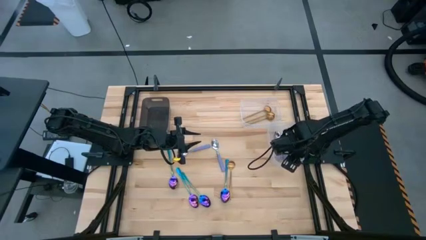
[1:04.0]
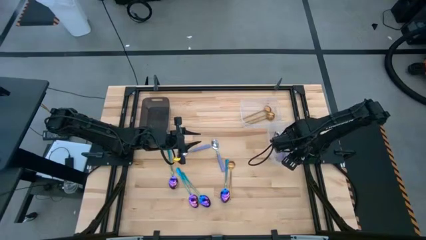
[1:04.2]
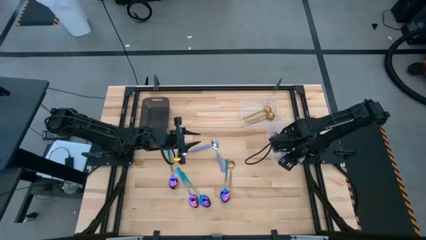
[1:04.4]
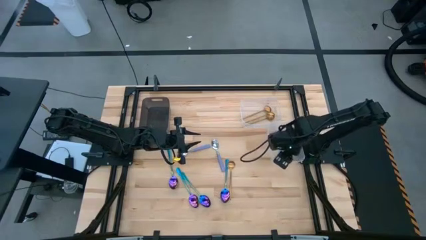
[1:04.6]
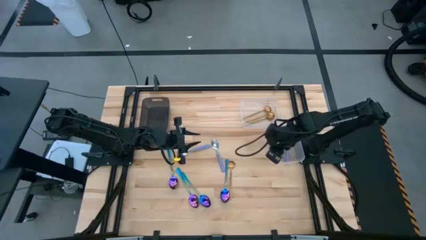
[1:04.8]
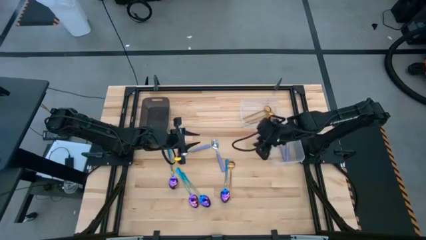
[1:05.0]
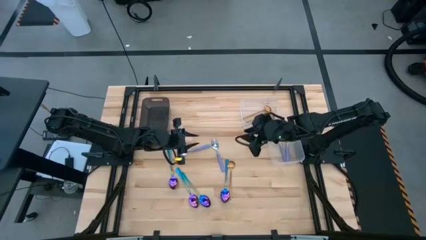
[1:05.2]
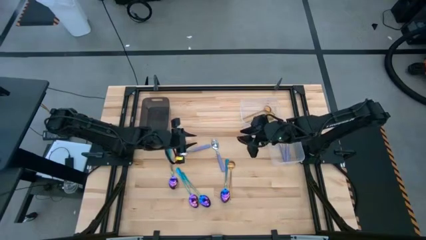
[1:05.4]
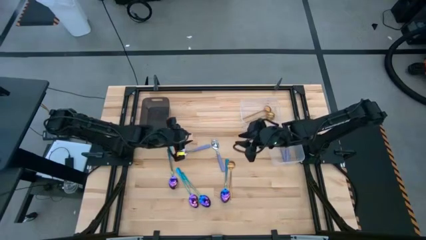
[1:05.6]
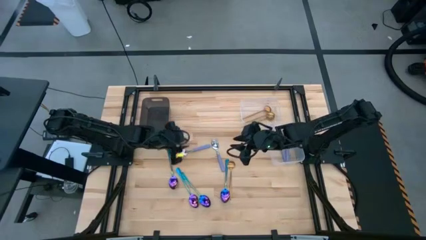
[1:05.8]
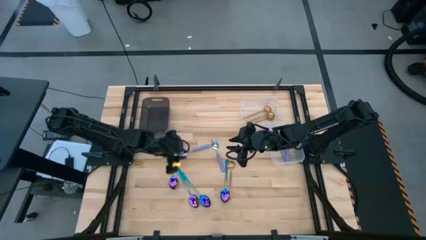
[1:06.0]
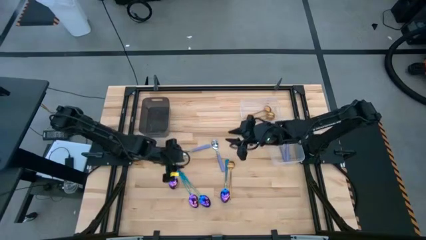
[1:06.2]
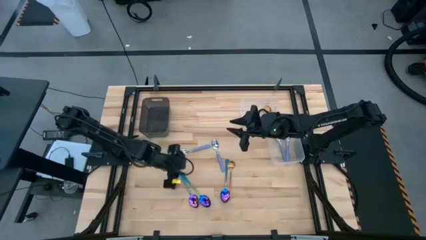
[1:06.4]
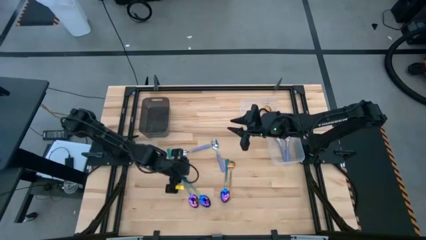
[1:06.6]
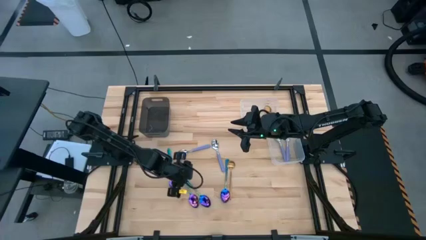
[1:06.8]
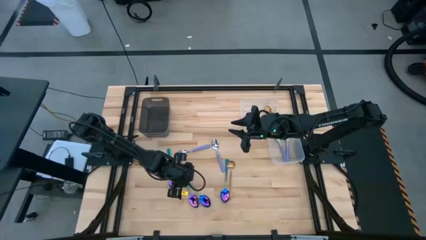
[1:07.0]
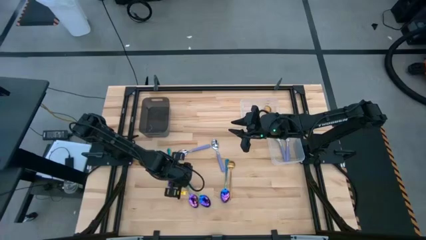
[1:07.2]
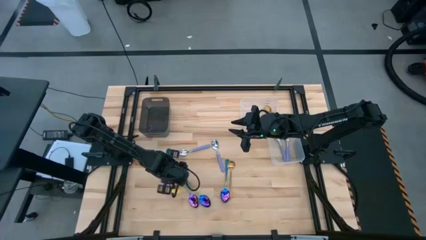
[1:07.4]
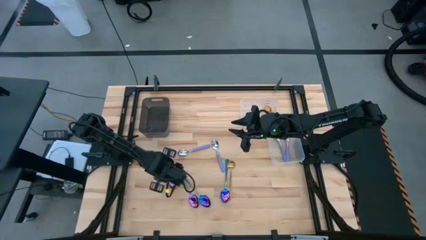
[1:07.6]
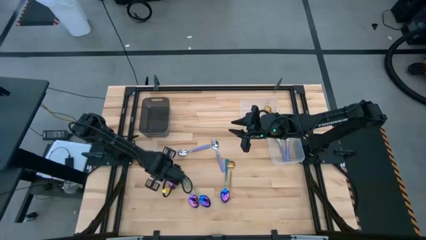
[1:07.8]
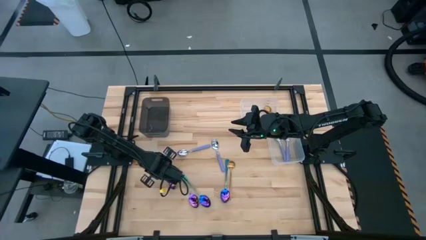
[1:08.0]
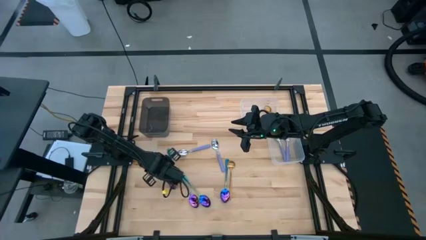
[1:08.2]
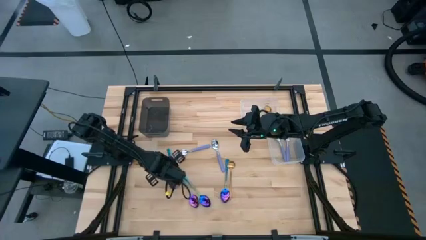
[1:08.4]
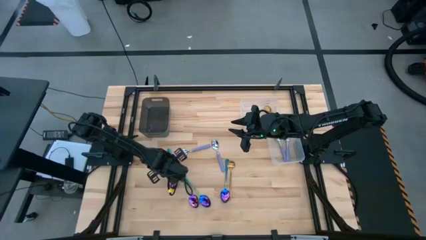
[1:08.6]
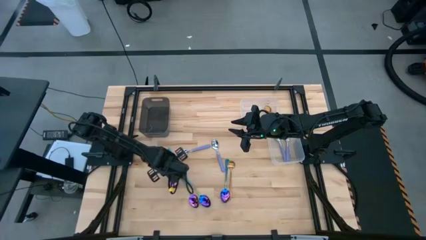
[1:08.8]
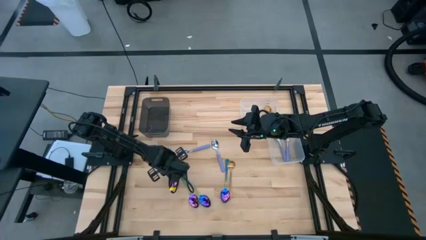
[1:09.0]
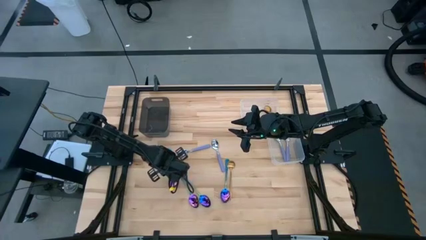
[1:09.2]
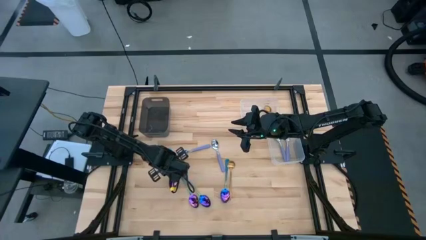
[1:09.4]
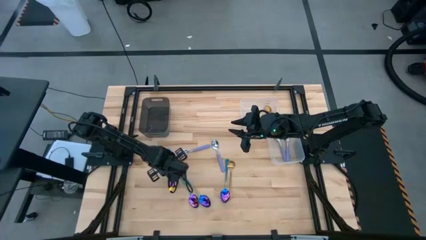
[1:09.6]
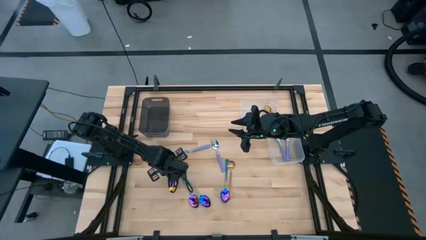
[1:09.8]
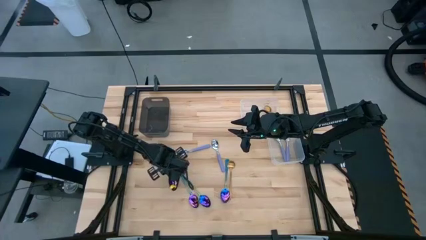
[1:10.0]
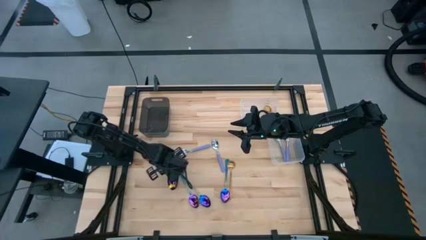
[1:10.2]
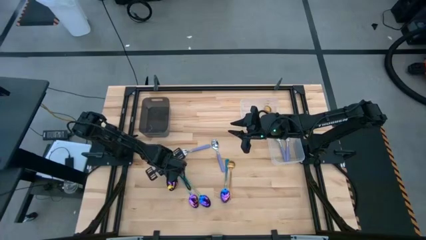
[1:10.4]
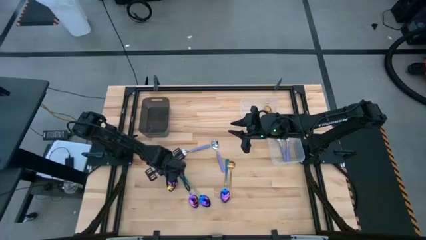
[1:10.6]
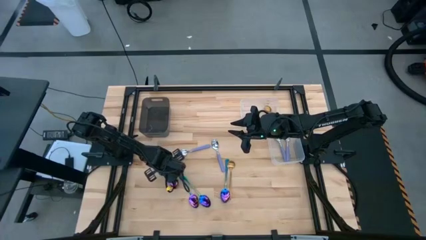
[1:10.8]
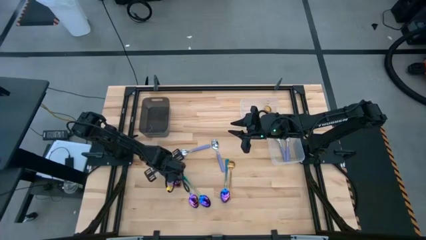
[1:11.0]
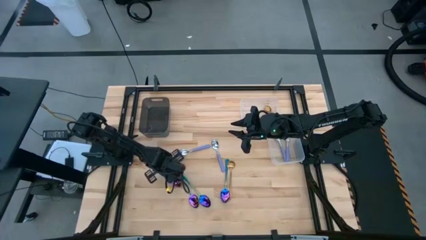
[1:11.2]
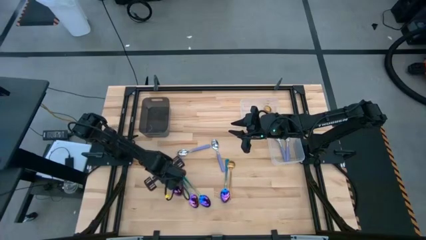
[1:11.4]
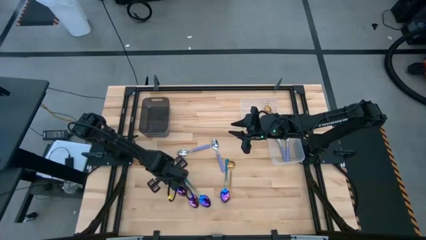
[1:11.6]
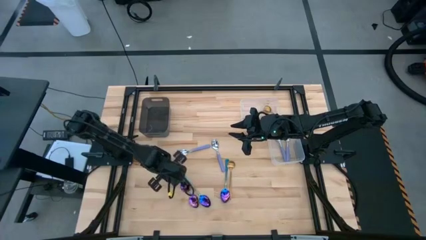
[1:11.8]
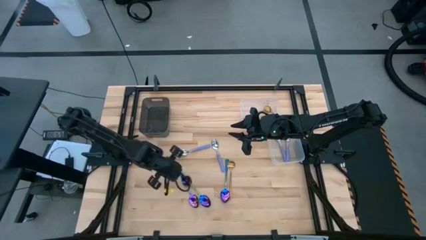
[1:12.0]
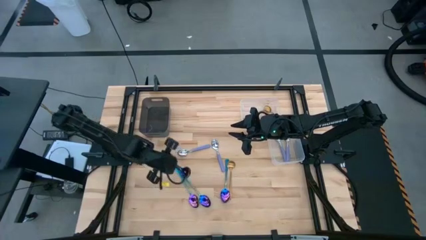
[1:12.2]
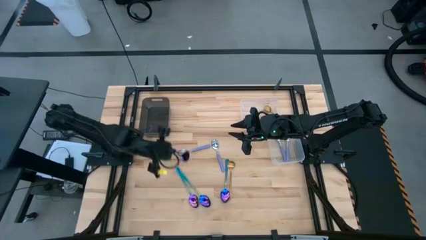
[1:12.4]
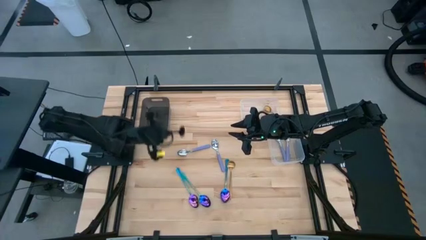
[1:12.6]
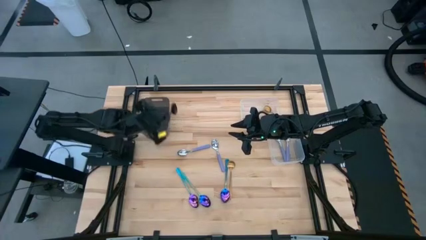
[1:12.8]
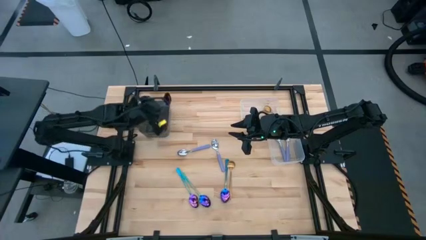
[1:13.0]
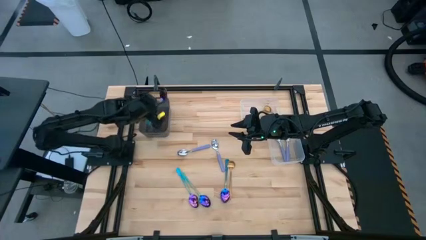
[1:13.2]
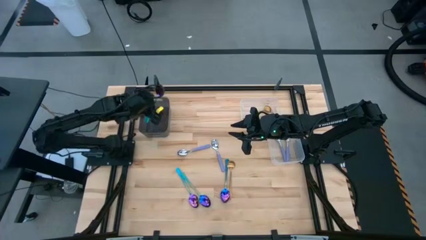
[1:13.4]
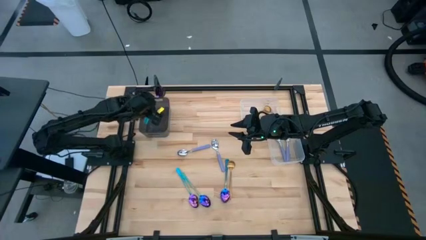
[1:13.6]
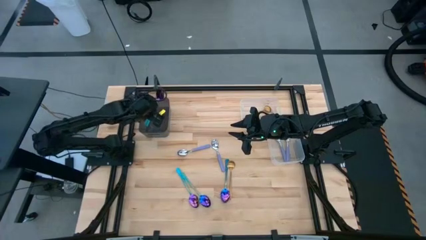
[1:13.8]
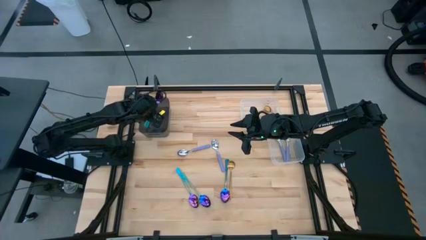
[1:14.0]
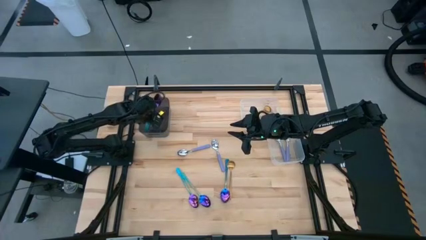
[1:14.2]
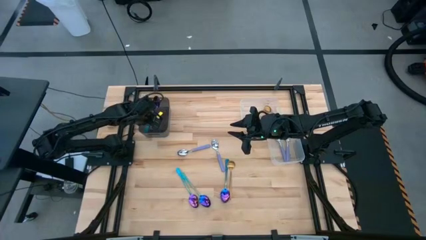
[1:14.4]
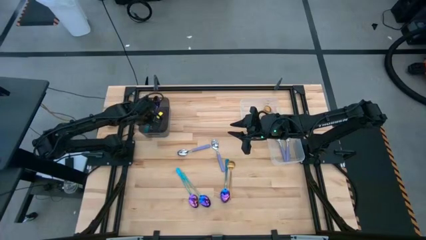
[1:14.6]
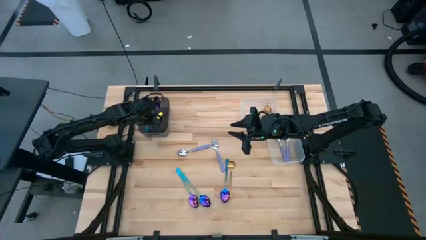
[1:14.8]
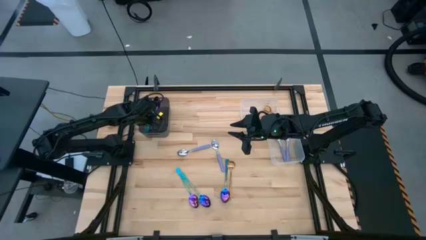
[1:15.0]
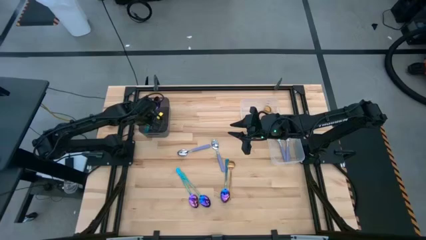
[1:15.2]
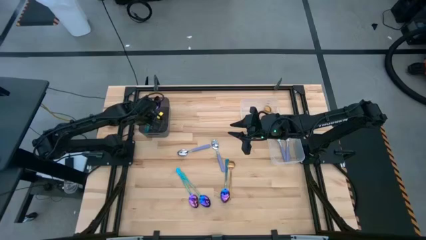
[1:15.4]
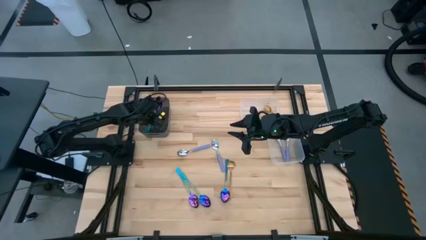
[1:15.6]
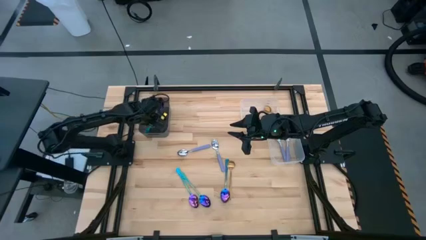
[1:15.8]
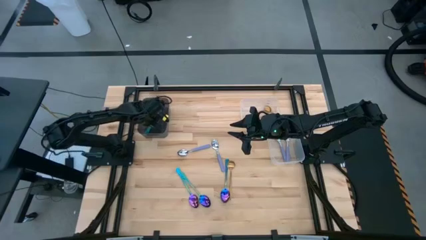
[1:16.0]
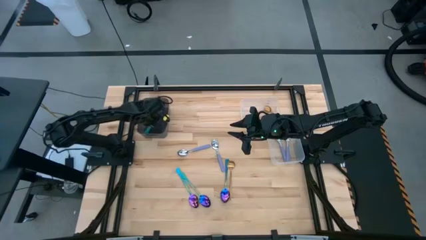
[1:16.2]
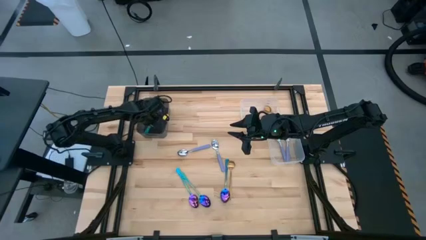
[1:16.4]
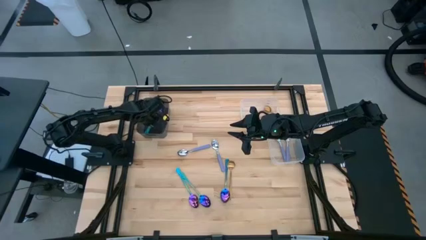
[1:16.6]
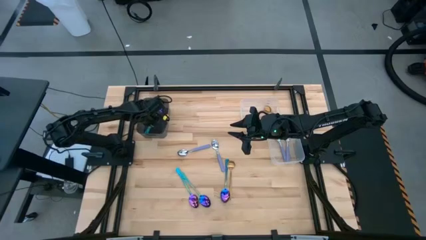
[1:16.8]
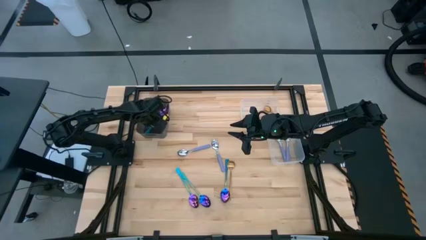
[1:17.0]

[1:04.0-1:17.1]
Task: Sort silverware by color (type)
Put the blue spoon into the black bin

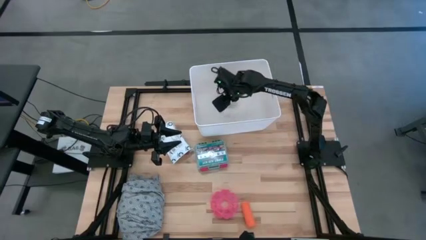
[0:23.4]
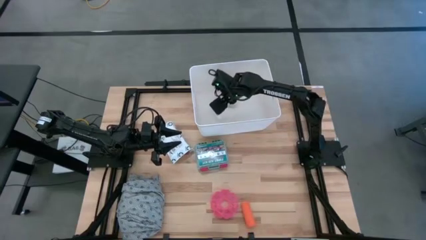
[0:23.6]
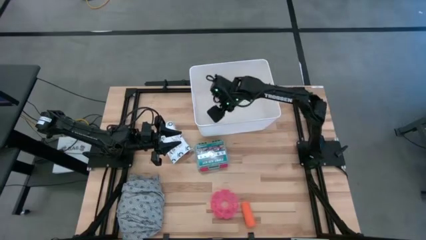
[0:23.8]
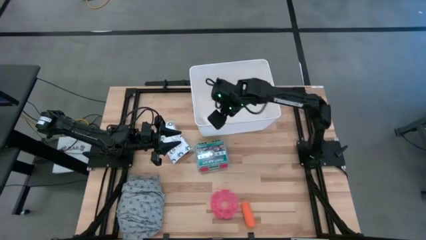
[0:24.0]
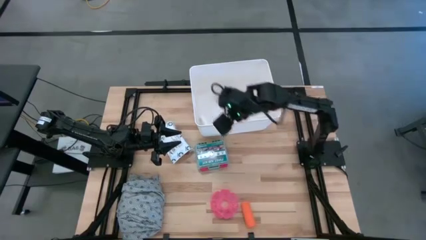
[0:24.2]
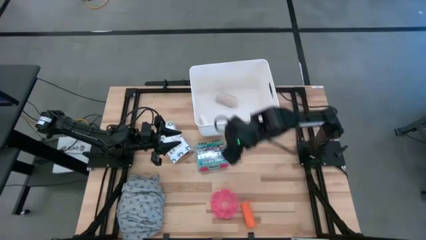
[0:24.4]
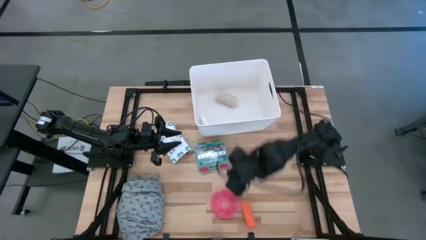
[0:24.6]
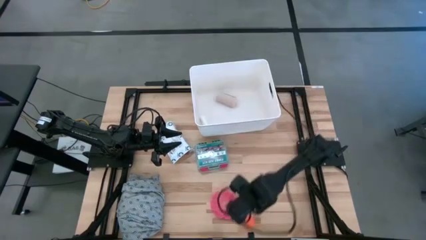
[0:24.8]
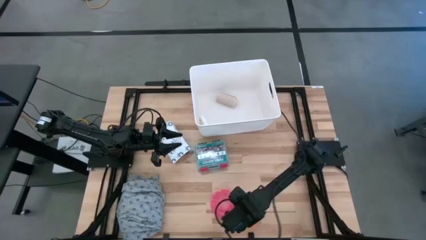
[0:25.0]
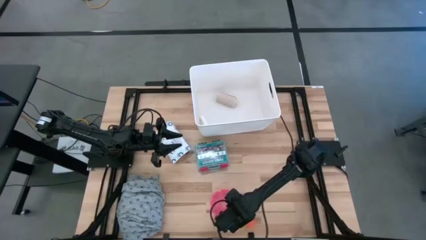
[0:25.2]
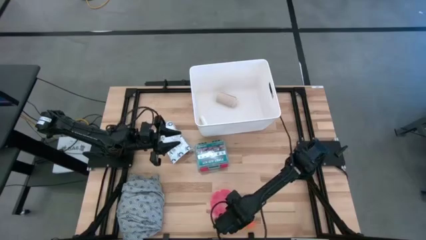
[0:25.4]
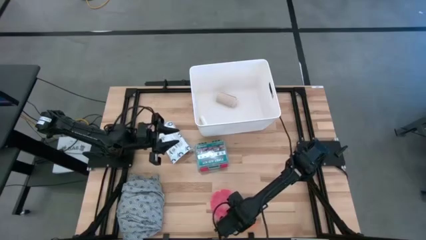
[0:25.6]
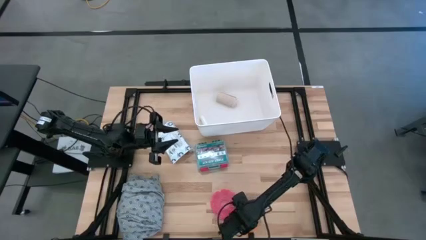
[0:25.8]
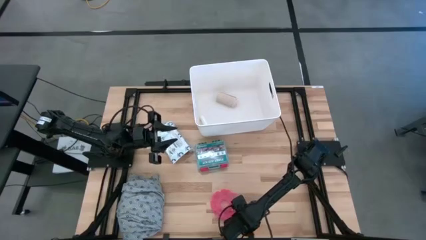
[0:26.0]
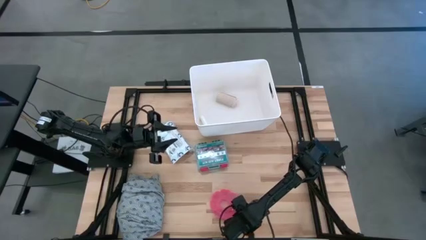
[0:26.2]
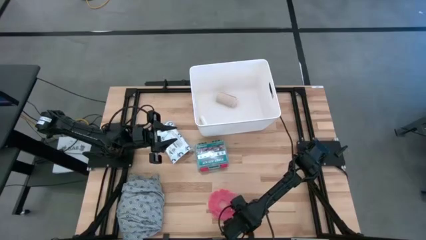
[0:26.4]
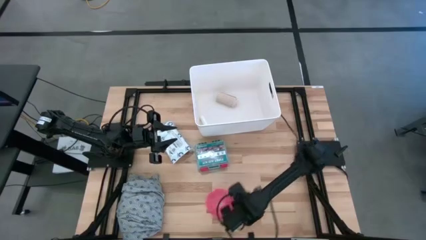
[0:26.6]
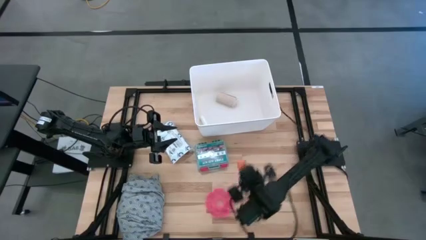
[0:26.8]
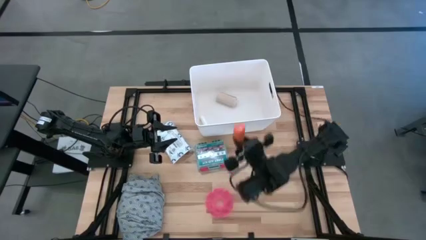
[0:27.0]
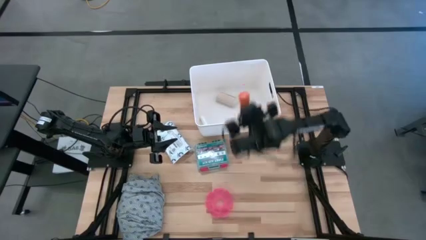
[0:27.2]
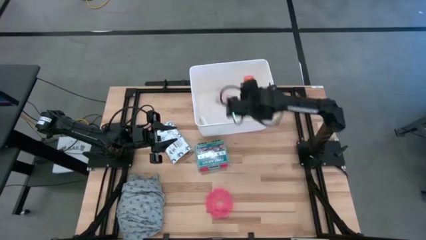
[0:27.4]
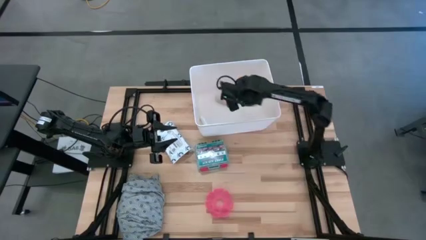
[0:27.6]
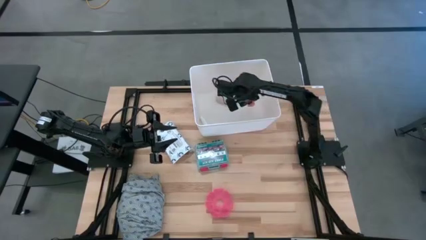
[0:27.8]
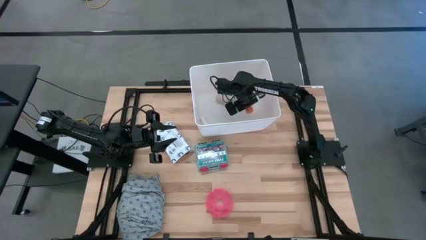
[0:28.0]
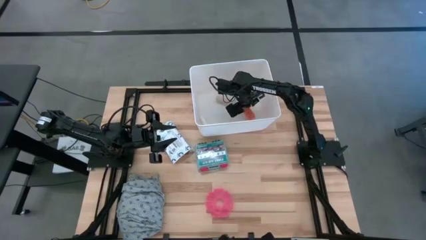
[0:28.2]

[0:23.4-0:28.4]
Task: Pick & place medical supplies in basket/bin
Put the orange bandage into the white bin
